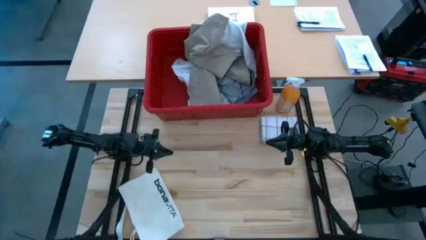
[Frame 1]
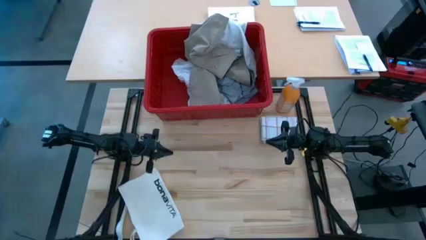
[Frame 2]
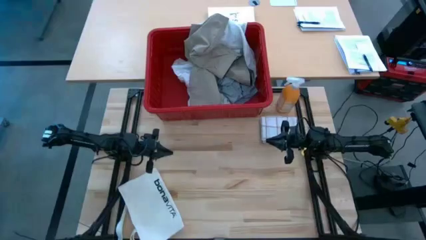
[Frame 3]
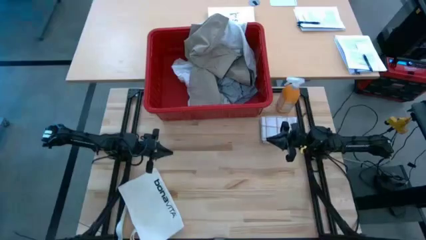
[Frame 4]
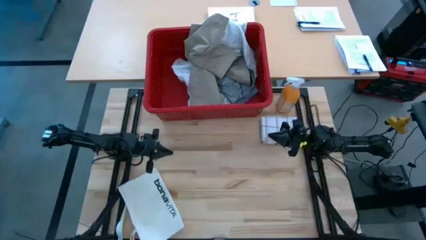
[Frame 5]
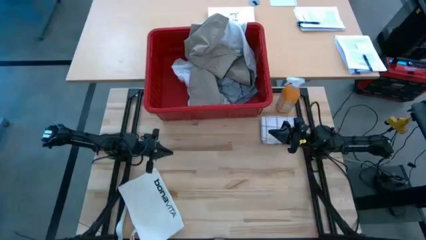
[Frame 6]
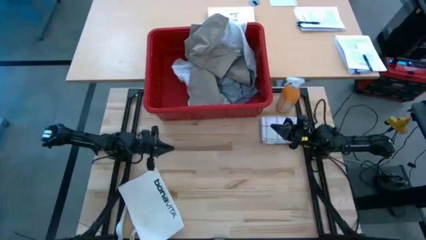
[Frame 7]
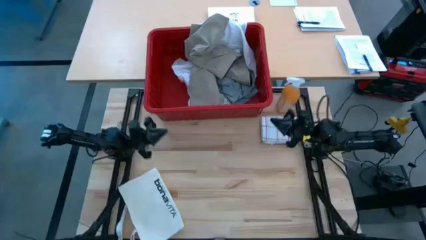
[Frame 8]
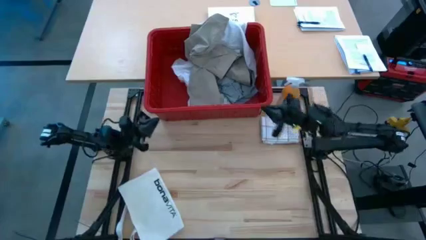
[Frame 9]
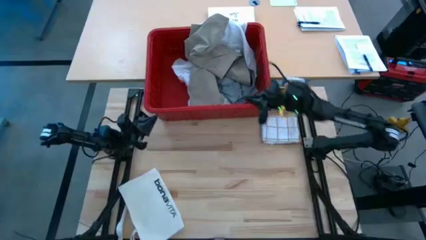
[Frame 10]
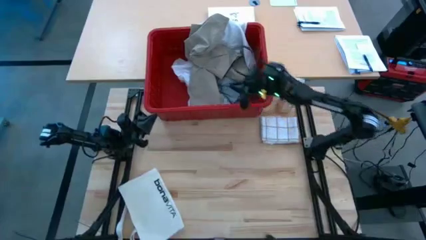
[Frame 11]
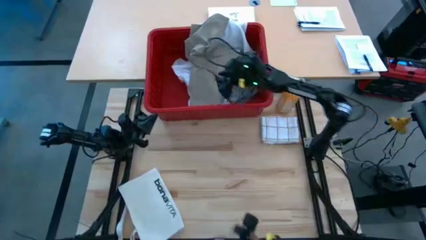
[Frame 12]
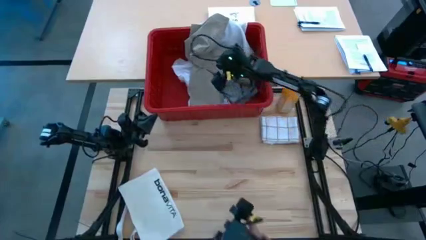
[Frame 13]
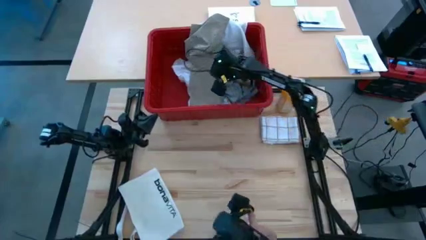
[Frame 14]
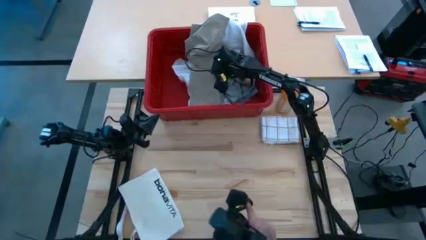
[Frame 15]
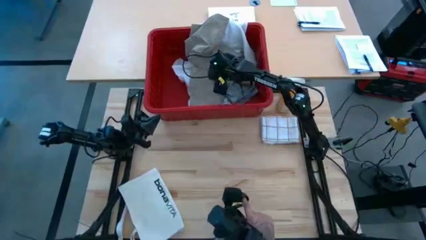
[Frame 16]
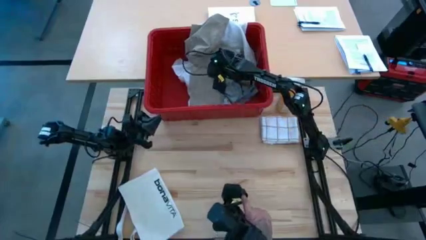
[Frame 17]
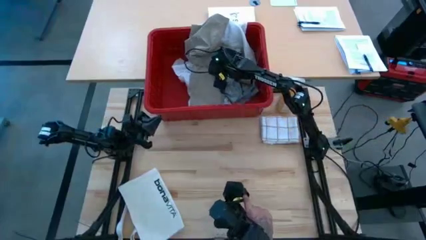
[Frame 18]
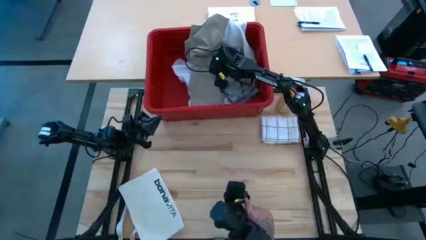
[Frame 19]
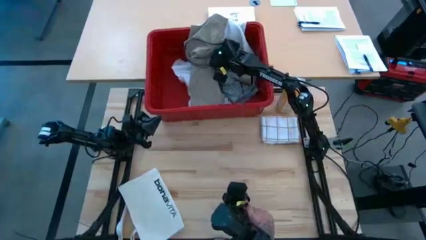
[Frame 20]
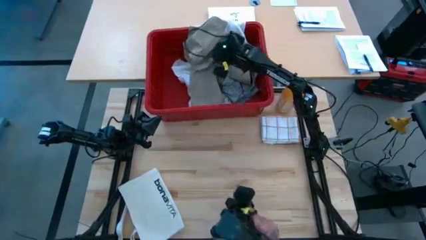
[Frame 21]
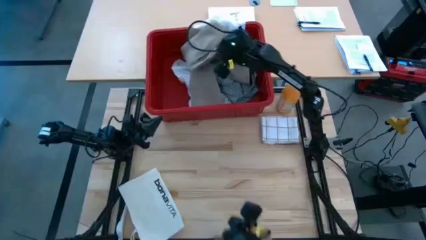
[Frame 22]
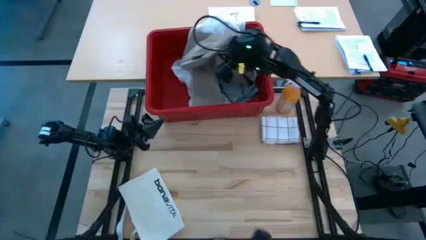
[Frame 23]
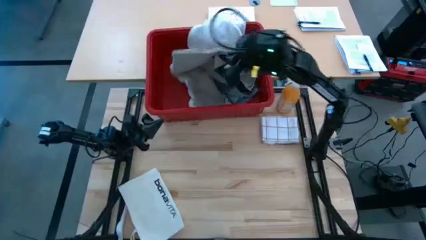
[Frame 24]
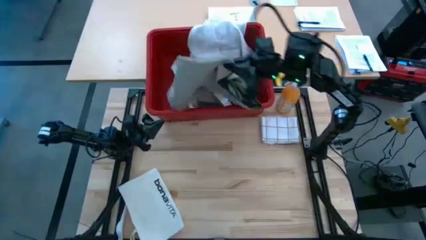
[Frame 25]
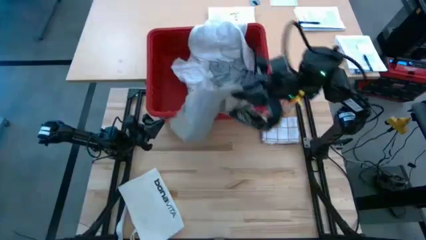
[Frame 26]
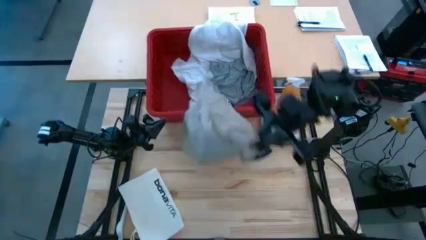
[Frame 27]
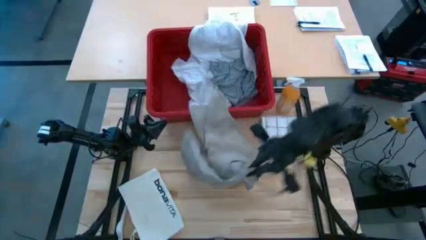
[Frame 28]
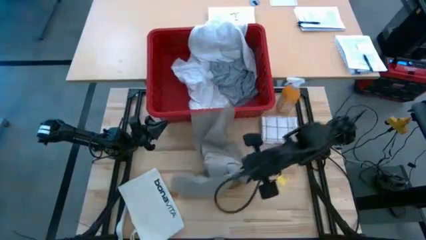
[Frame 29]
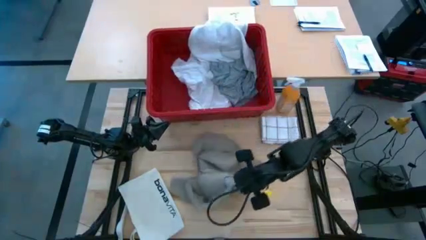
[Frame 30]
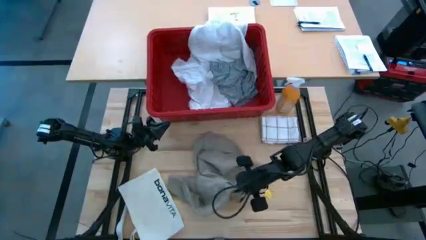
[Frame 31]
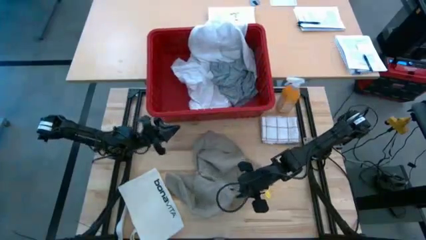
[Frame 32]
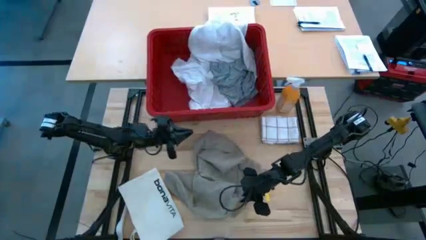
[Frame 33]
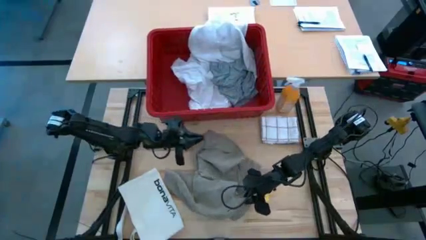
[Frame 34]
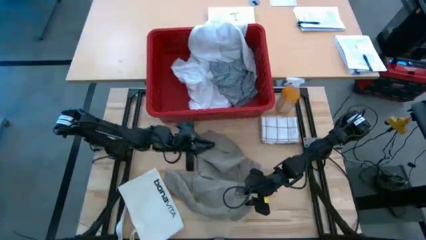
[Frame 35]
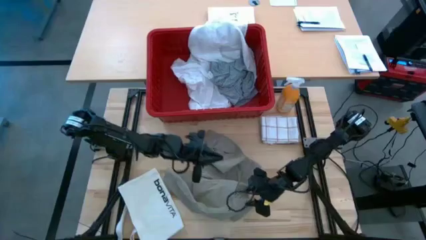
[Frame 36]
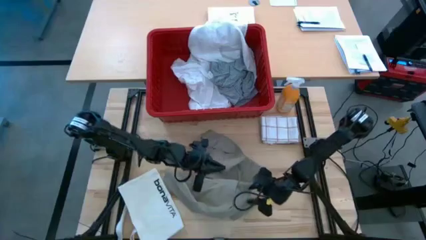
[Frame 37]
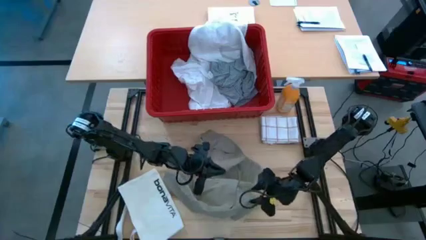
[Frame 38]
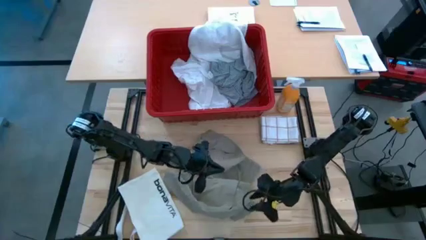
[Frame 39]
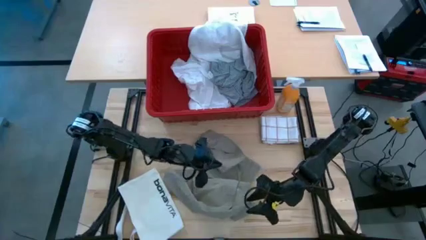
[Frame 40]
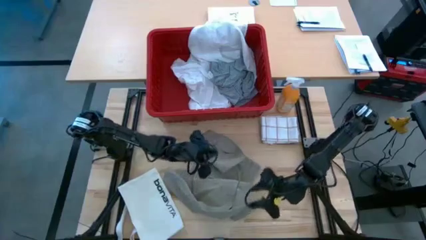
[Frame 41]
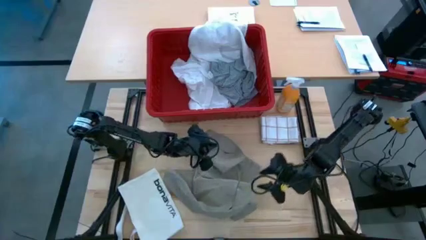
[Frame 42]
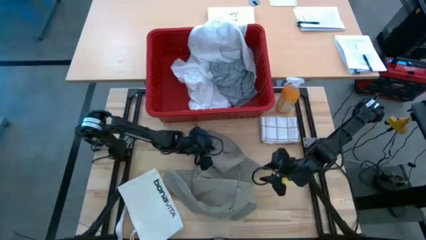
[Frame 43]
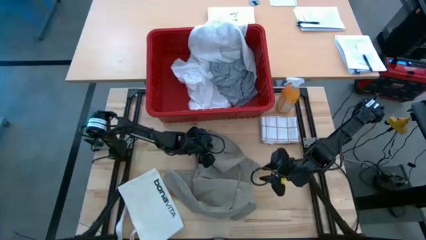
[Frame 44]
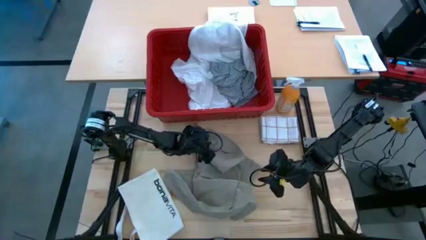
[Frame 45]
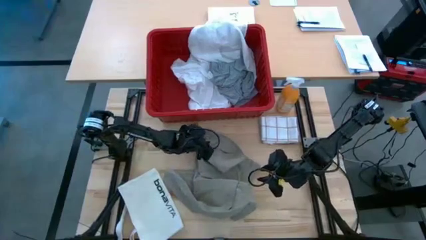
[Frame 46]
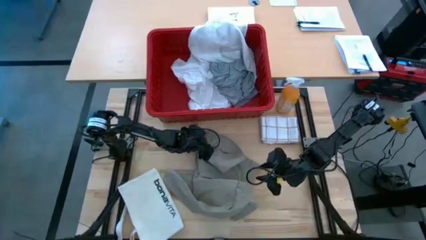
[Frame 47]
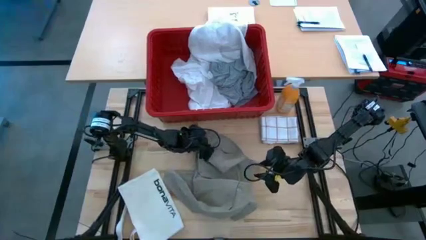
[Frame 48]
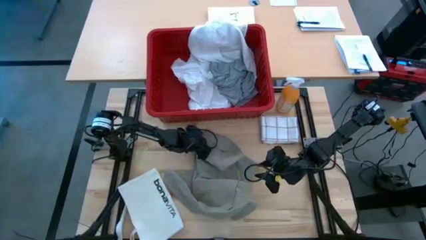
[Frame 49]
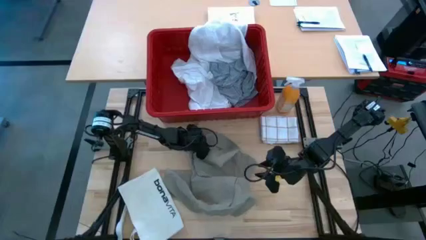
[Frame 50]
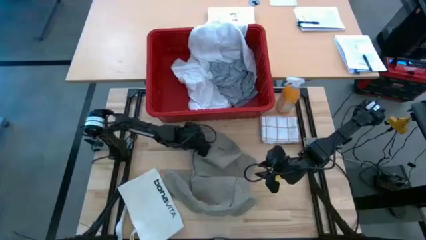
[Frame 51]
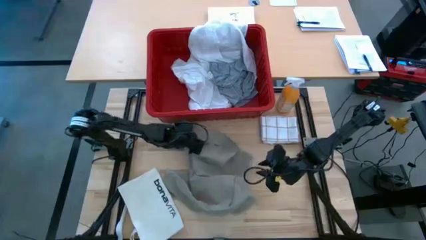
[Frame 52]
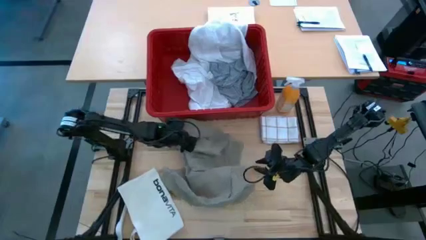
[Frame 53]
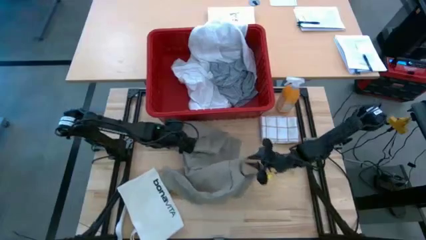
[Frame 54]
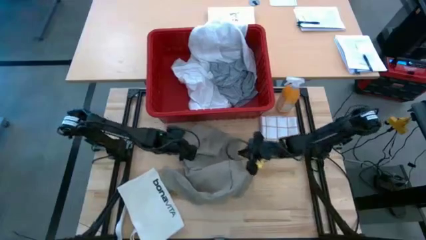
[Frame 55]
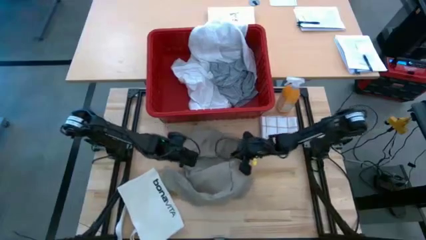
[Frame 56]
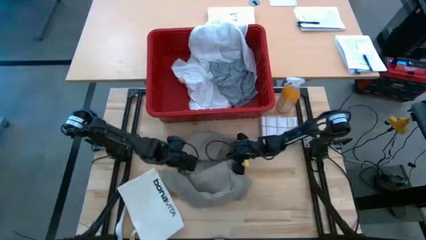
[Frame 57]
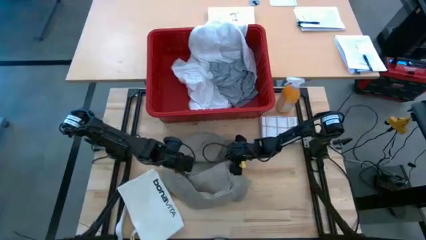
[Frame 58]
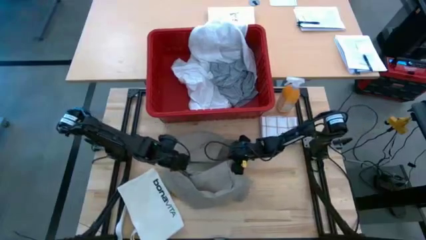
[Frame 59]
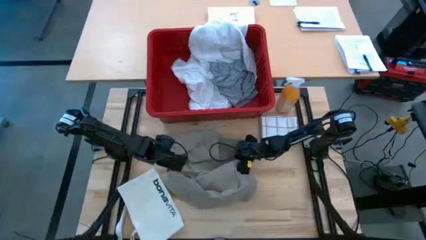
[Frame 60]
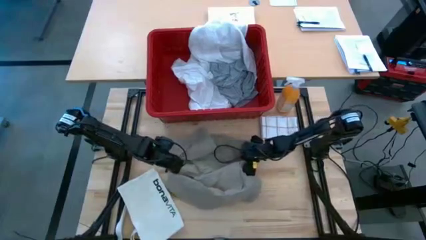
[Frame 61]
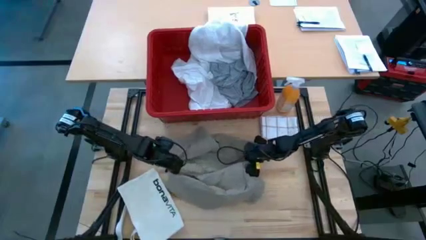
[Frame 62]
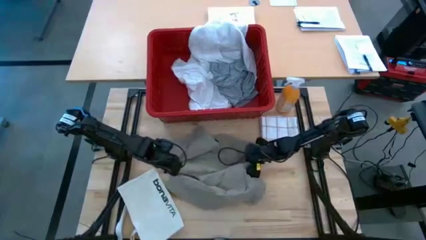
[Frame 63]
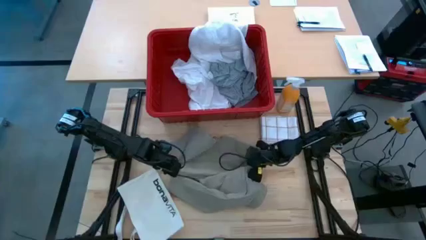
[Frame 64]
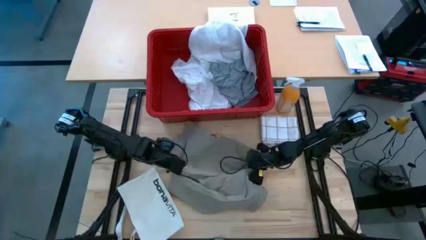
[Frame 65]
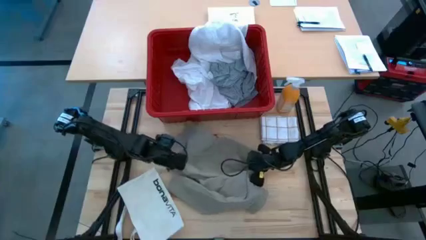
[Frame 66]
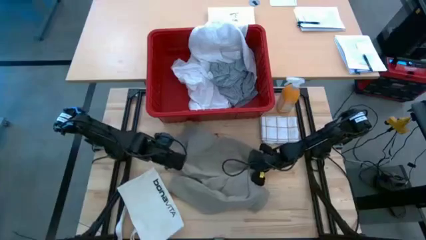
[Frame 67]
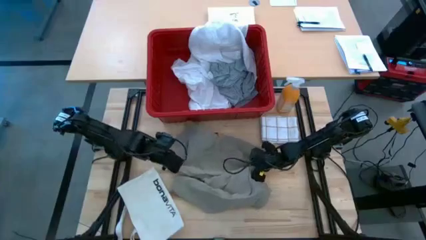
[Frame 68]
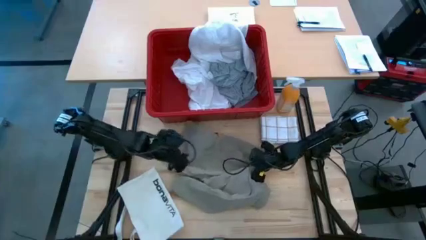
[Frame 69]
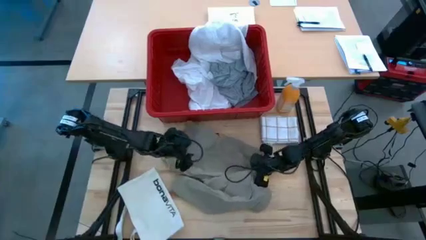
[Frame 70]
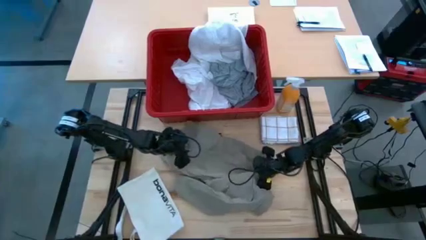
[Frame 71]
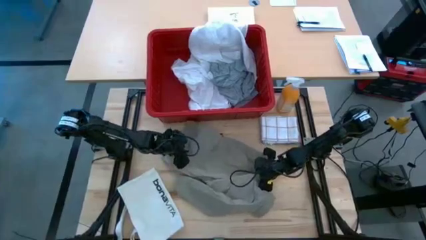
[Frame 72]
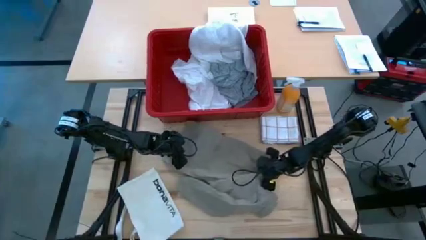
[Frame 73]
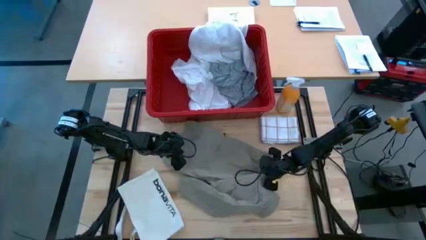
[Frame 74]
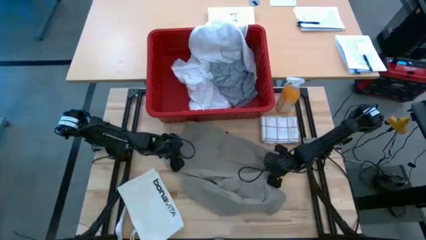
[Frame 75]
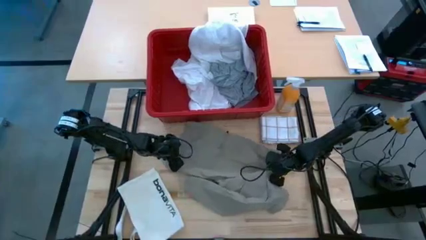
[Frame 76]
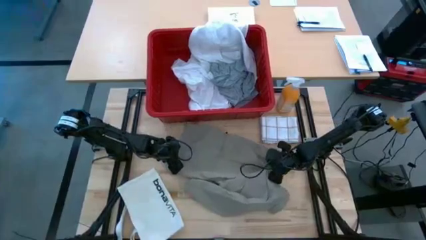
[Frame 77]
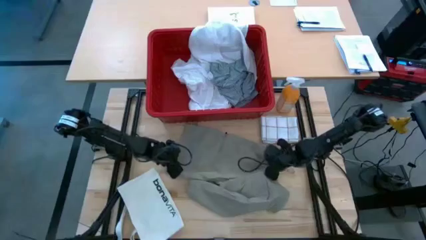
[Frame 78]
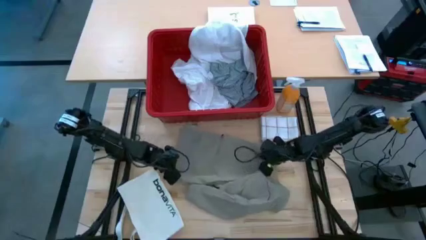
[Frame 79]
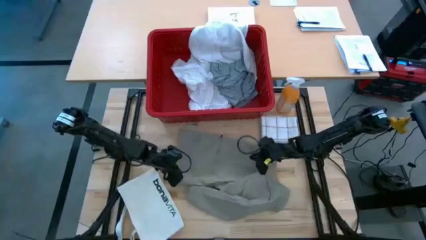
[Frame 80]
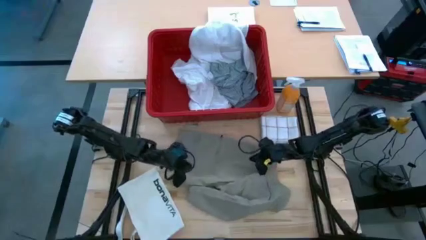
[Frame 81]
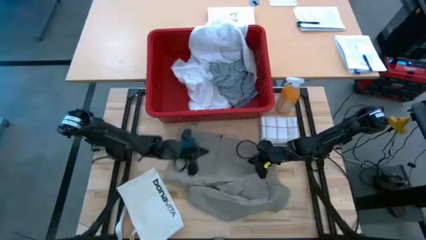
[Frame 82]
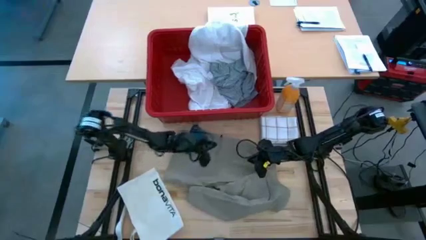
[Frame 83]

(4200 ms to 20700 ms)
Task: Fold laundry
Fold the brown shorts
